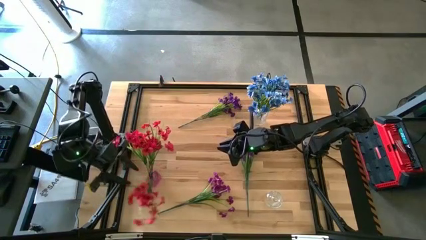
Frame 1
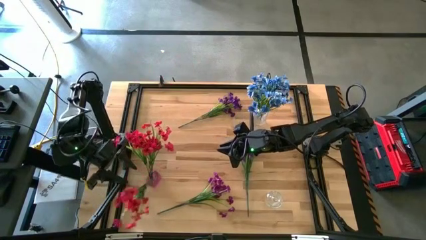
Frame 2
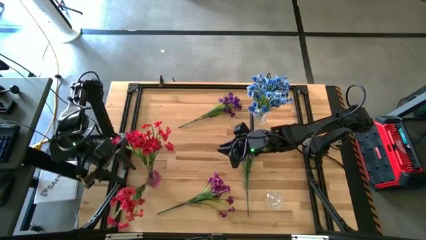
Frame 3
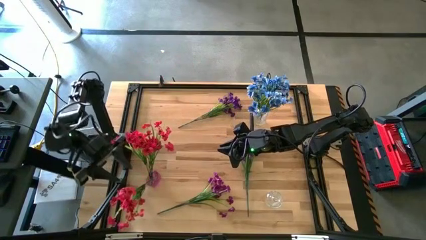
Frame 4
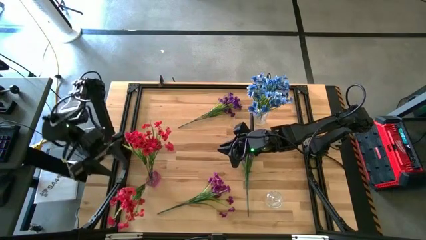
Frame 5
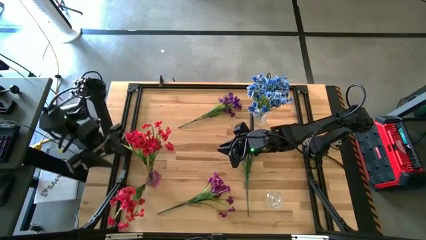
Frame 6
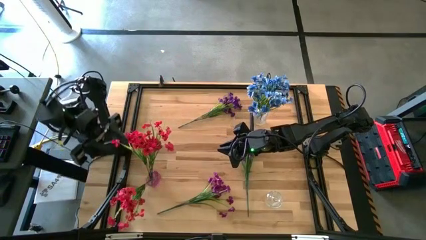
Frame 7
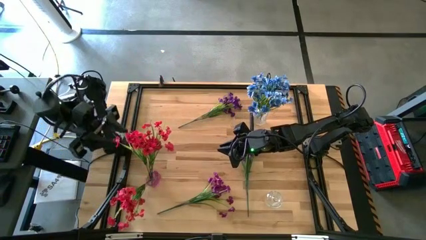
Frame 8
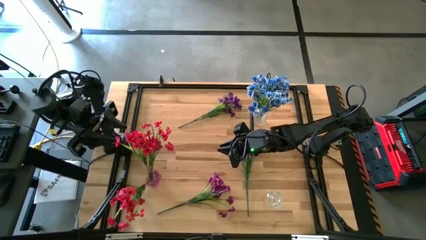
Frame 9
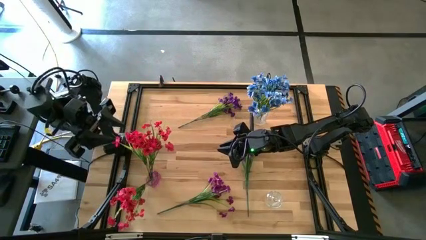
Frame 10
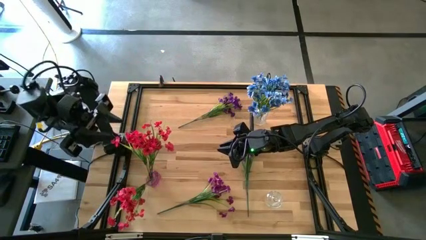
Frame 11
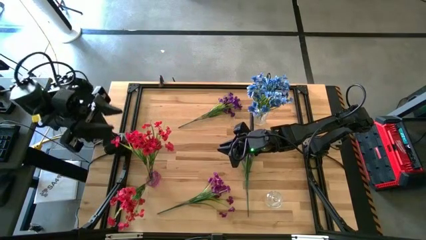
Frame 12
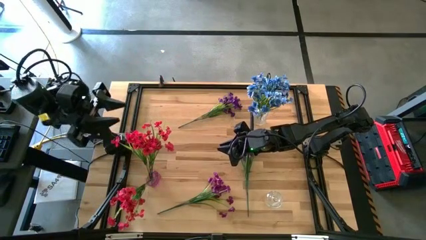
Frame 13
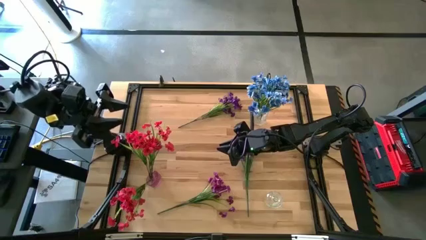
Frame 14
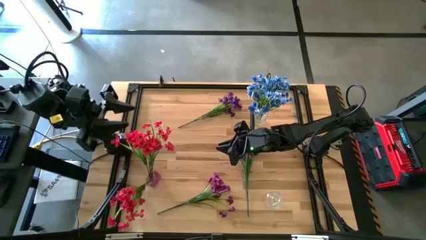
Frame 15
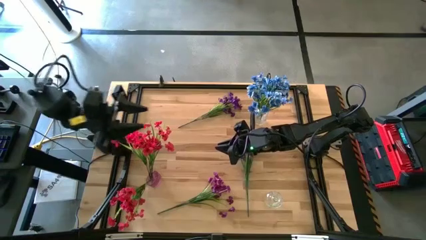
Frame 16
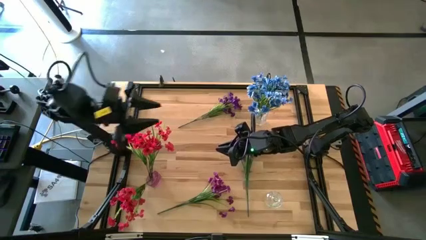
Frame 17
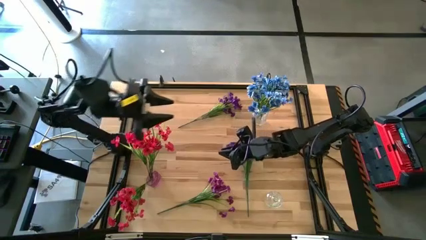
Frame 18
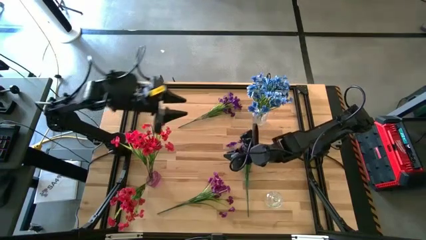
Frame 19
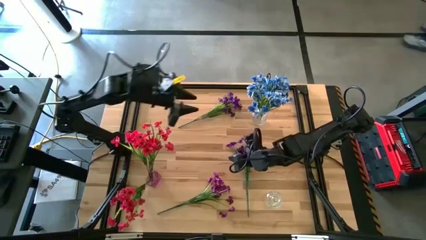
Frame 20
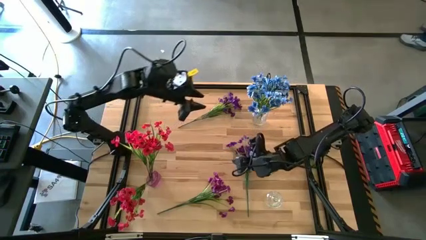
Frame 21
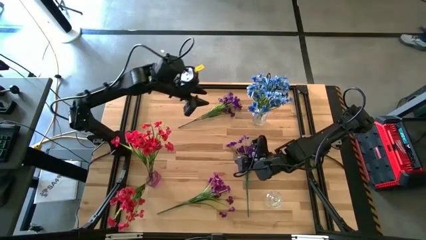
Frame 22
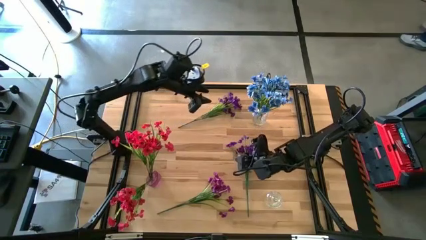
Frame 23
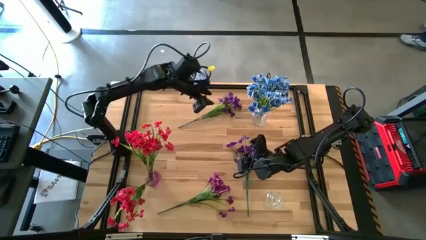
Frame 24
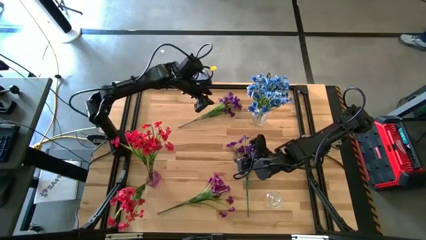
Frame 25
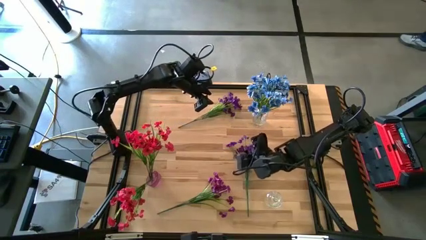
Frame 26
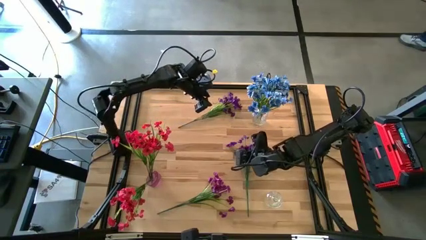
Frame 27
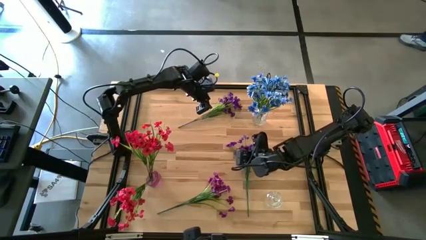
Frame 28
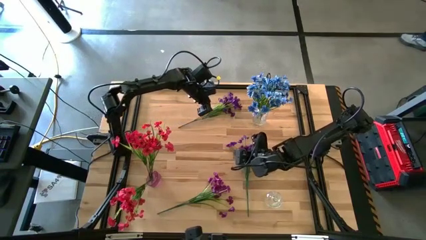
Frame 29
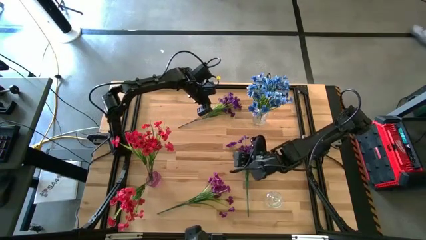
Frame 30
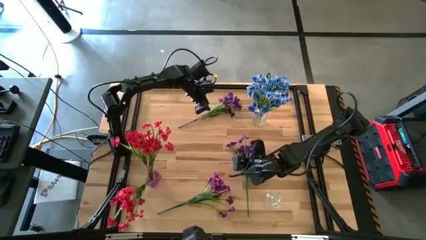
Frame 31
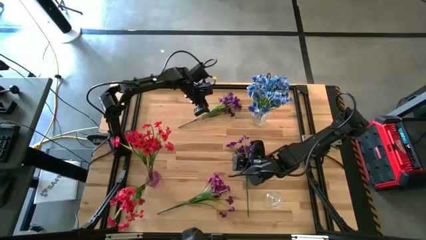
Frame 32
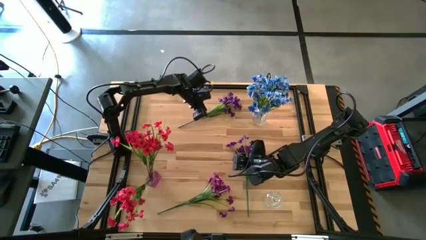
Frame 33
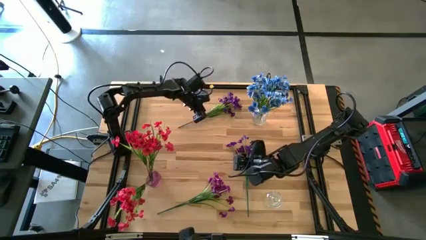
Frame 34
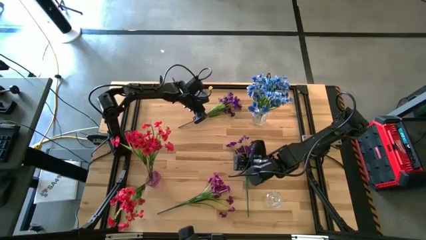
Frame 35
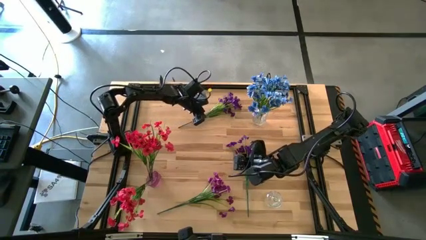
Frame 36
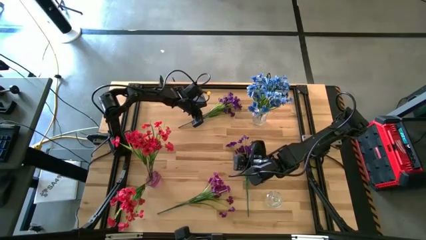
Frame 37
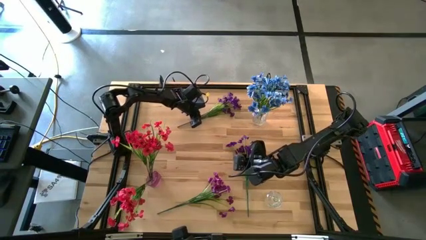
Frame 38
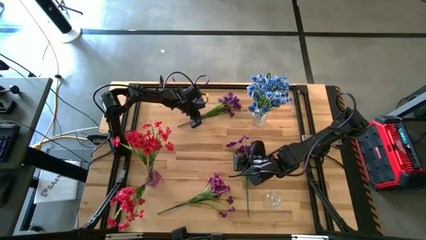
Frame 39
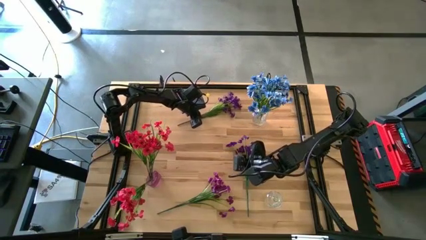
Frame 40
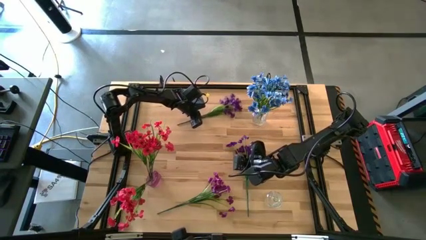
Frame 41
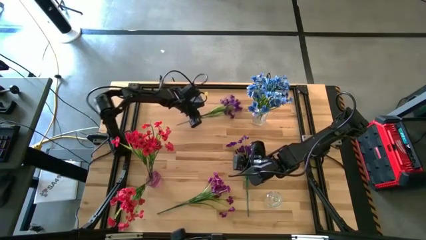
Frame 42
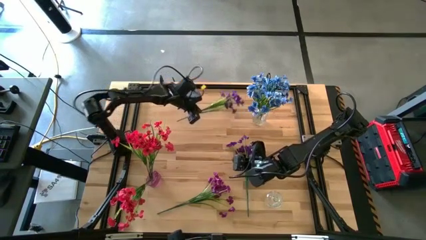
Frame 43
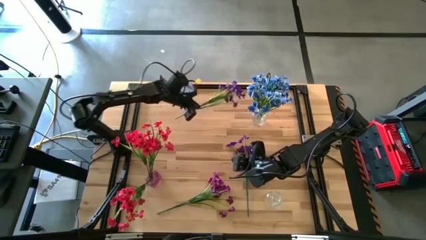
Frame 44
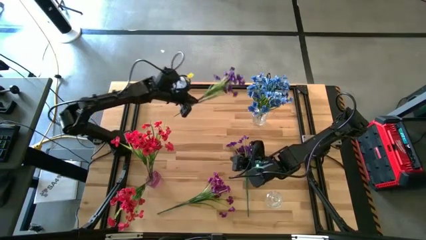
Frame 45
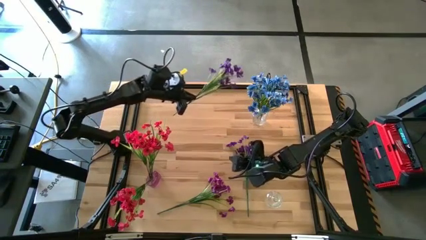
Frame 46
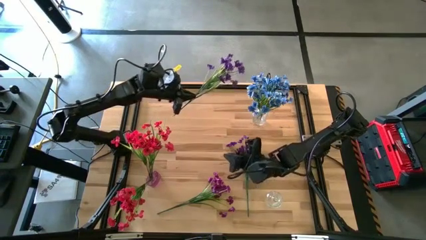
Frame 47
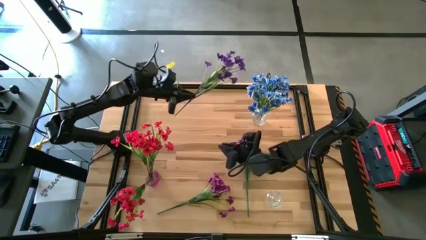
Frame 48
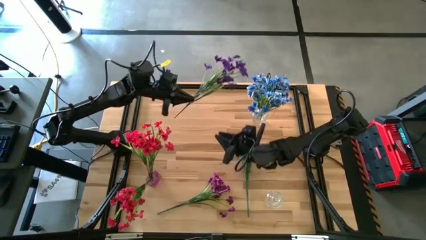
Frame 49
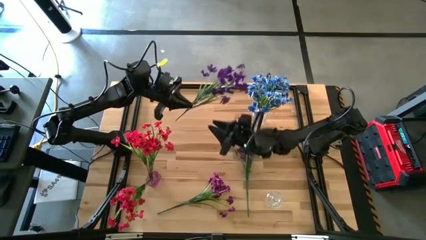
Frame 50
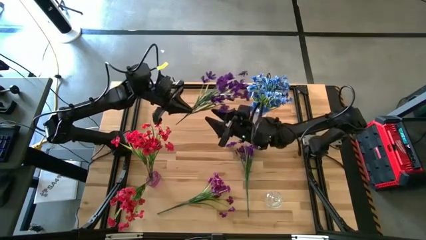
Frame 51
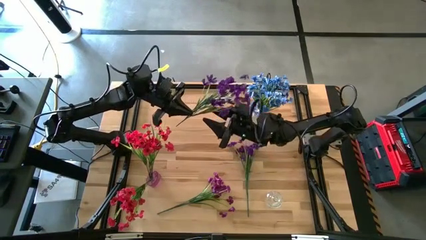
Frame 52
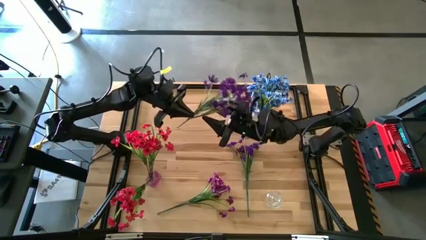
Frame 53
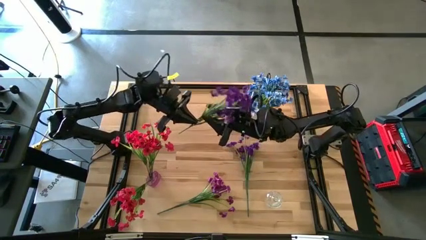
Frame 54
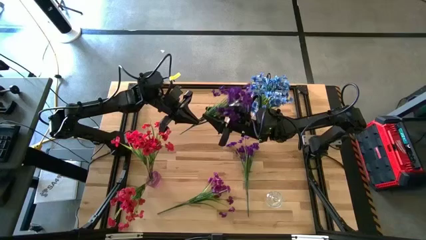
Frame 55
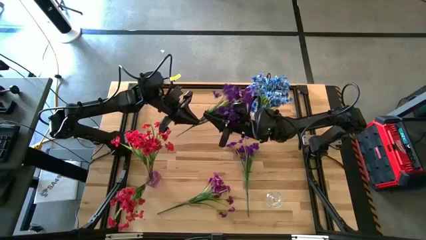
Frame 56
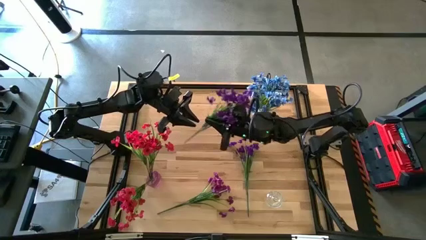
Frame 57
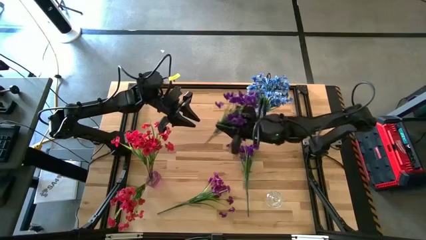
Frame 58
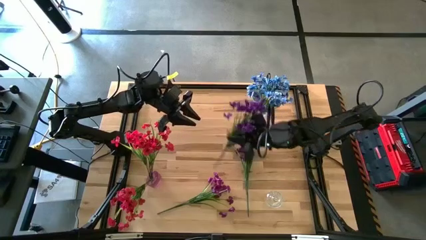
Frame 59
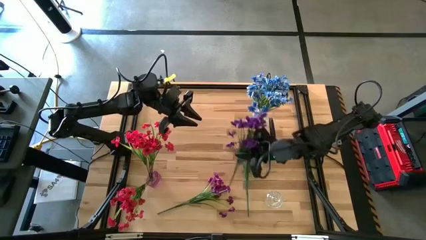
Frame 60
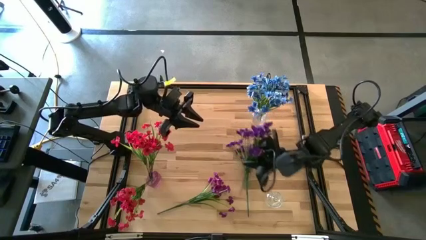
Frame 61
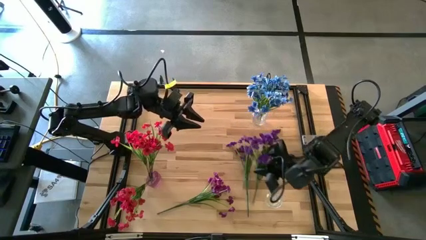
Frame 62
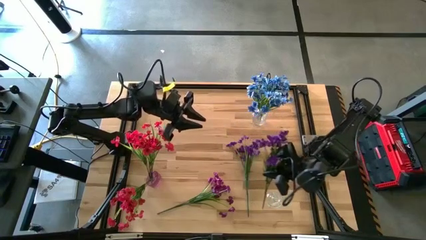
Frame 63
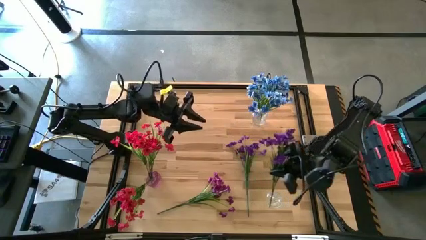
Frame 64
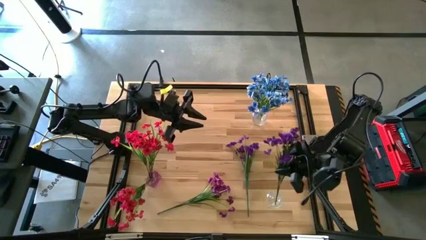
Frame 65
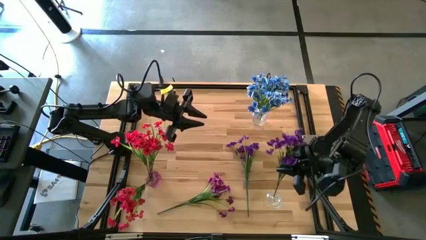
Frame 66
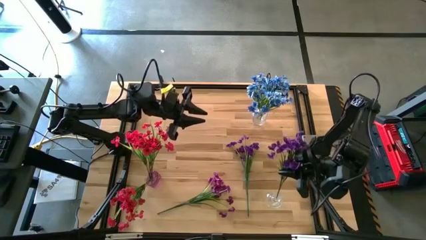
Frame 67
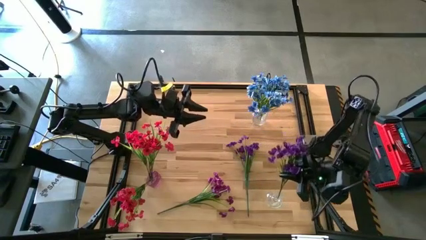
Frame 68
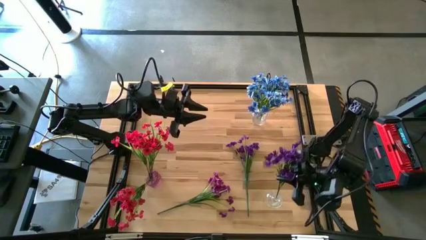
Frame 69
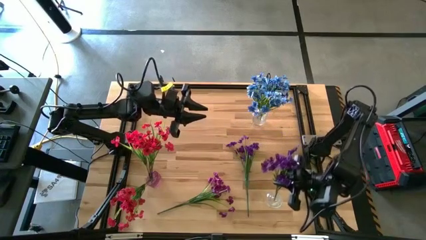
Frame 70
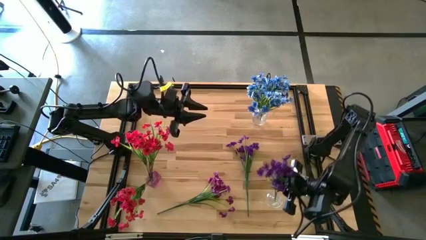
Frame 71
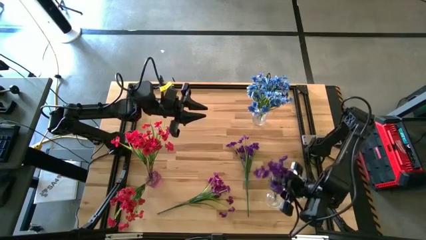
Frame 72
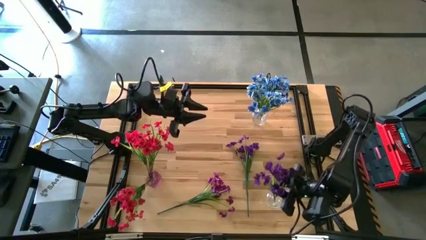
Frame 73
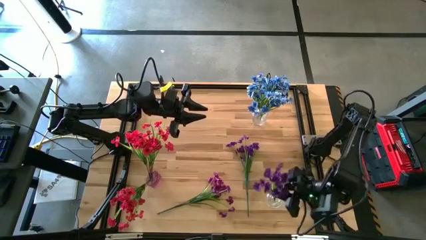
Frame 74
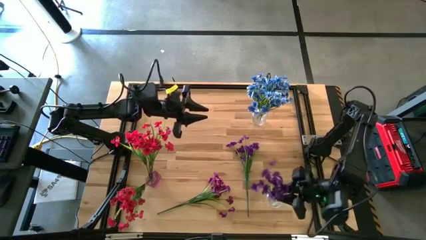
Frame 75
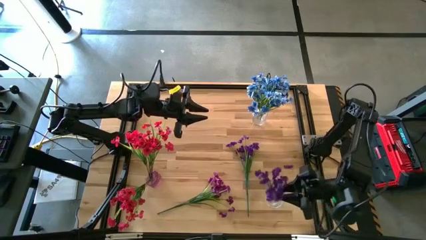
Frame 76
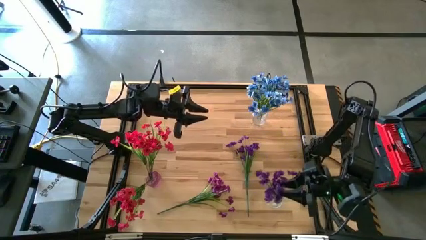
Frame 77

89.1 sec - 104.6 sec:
Task: Sort flowers into vase by color
Put the top violet flower into the bottom transparent flower vase
